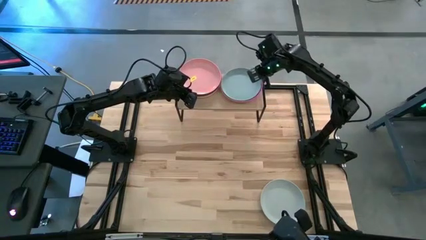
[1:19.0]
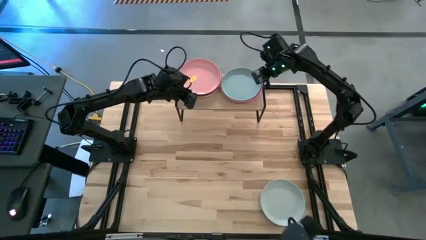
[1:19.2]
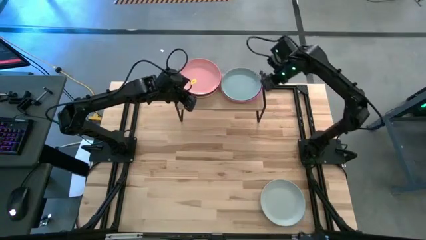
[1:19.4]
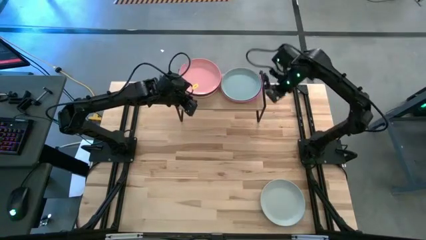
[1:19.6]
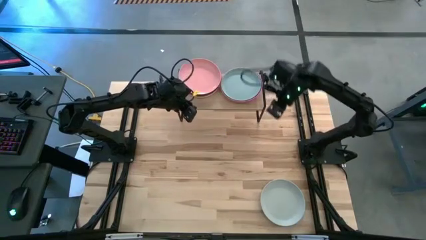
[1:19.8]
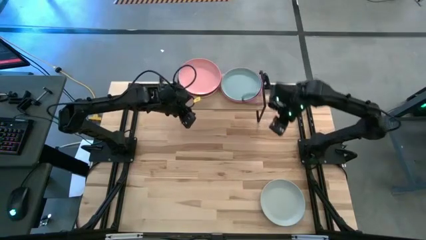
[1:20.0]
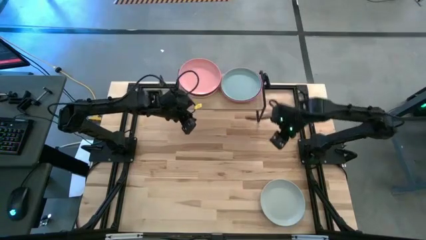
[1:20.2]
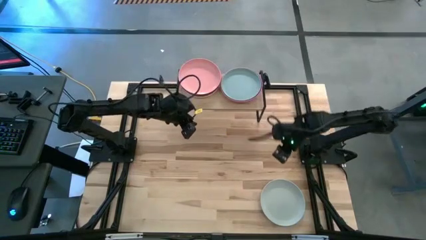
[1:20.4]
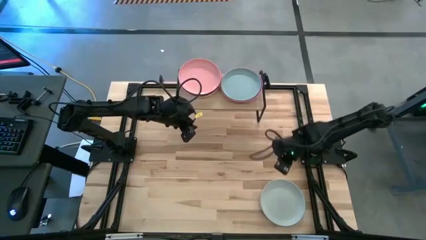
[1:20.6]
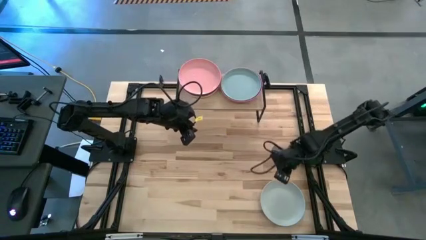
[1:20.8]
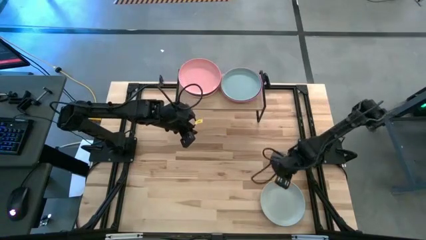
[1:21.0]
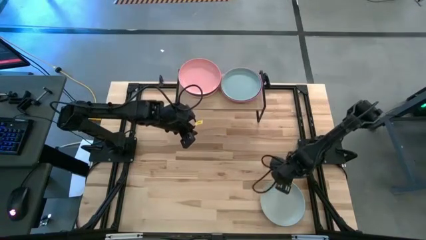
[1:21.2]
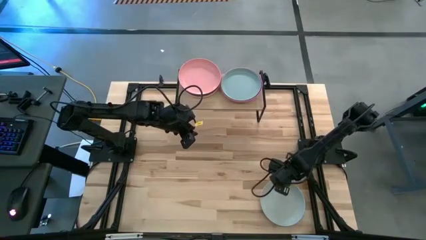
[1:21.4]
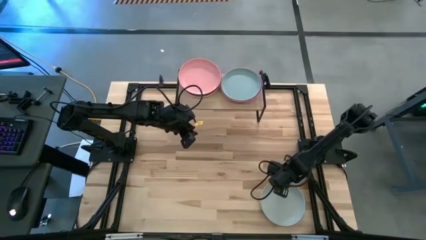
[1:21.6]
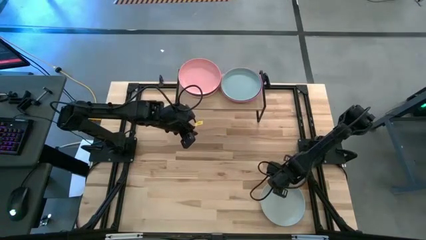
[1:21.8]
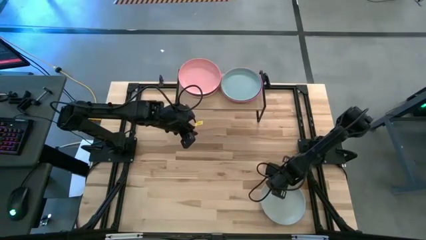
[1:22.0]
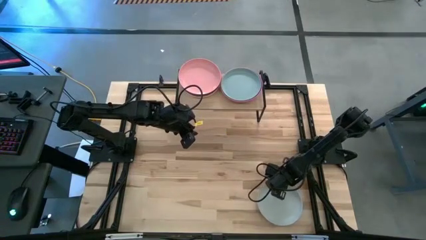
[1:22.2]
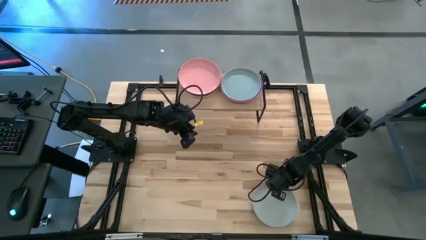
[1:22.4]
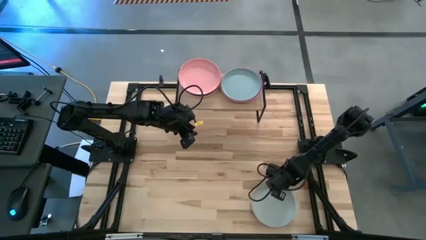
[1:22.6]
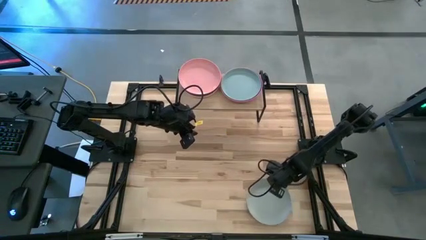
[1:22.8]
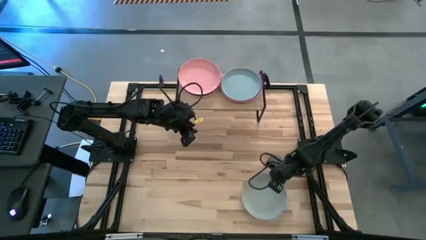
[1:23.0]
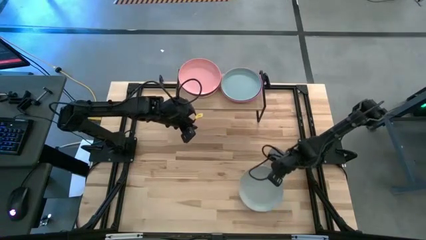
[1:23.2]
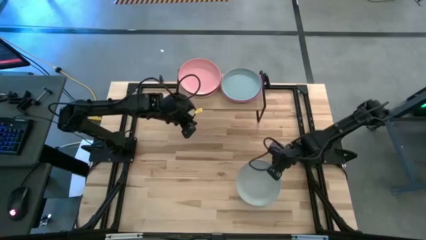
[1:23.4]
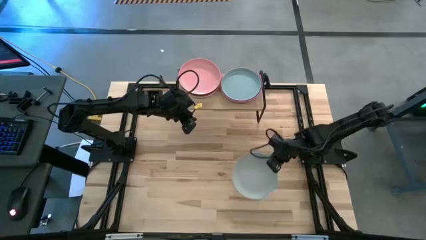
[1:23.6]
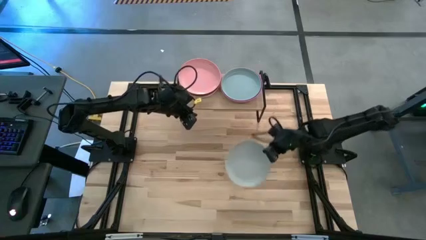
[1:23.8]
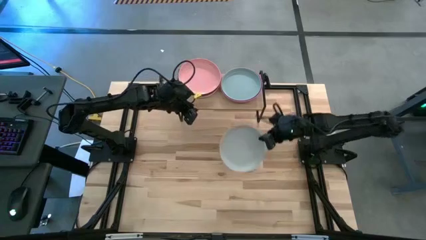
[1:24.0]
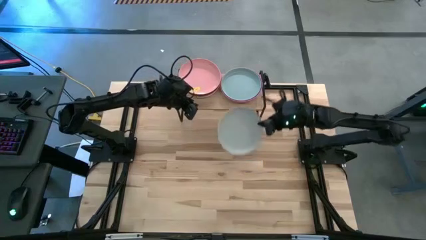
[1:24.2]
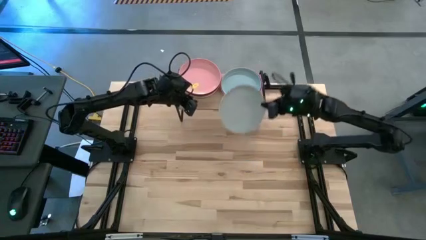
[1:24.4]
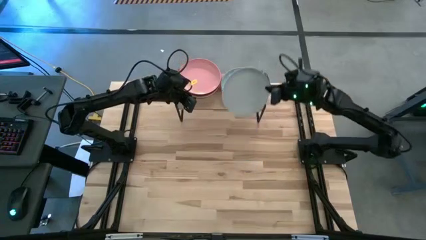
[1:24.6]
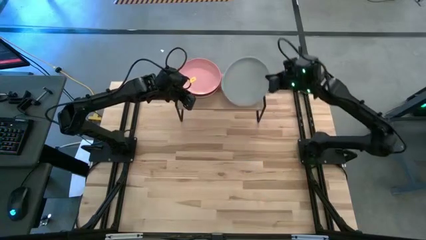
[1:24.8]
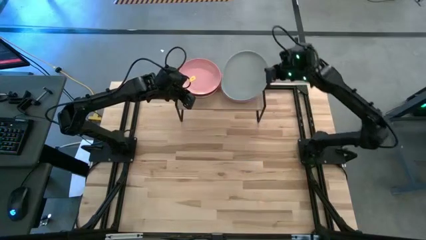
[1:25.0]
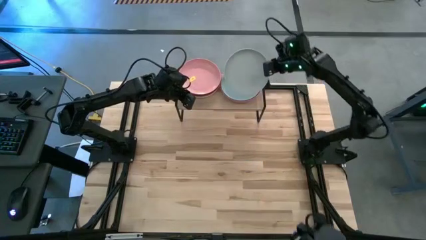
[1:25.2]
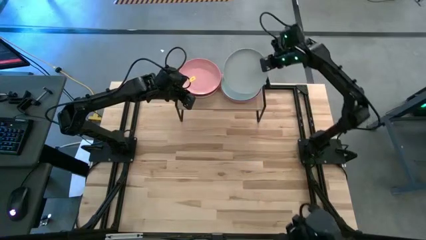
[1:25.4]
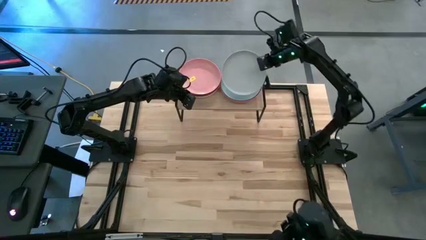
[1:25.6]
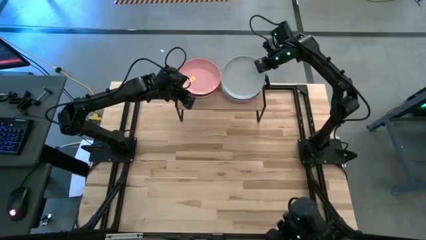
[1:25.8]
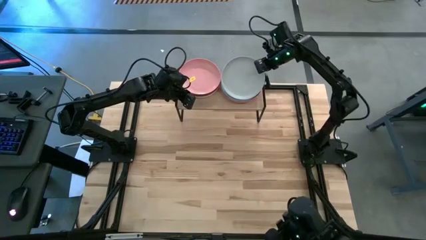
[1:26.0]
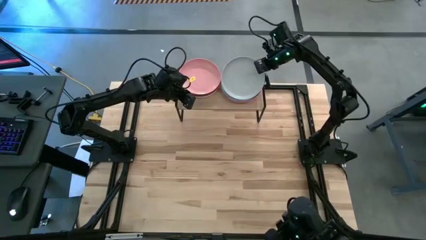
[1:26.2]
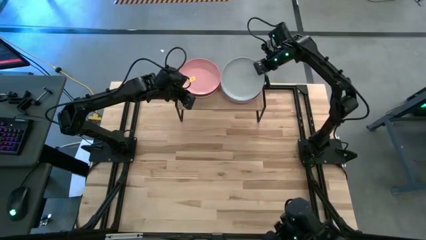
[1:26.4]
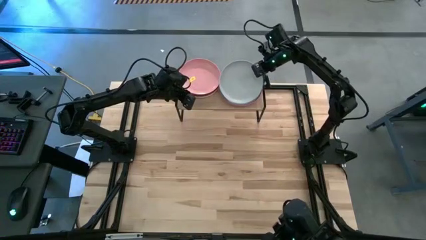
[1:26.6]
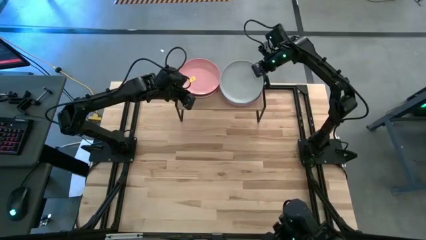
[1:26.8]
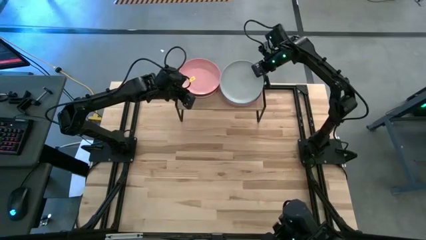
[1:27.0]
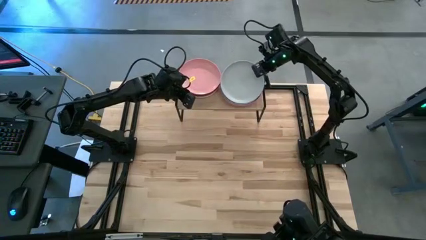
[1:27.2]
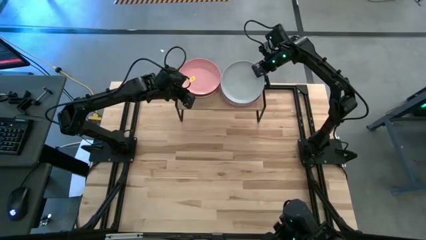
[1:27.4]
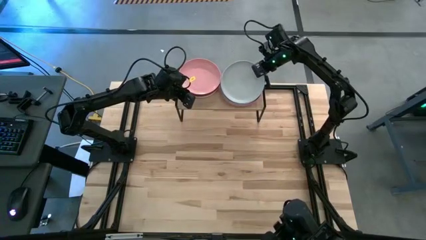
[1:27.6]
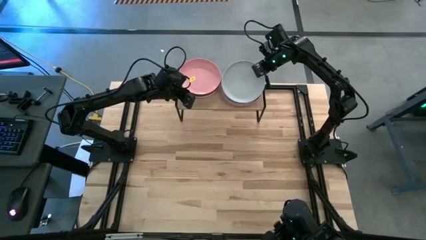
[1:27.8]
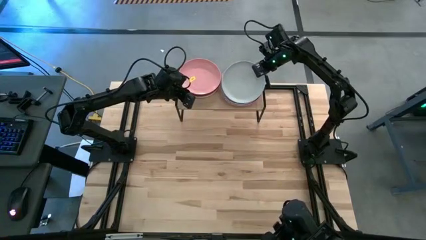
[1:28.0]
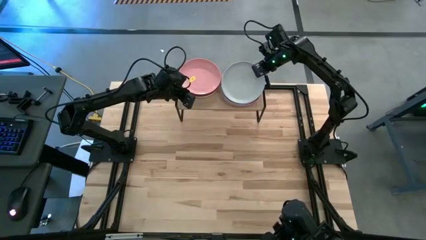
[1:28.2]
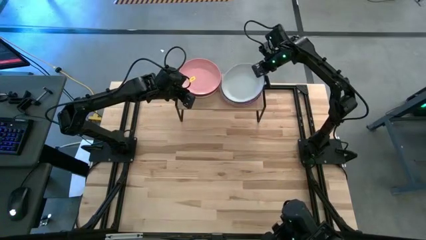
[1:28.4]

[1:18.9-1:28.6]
Task: Place and stack plates onto a shelf
Stack the gray plate on top of the blue plate on the shelf

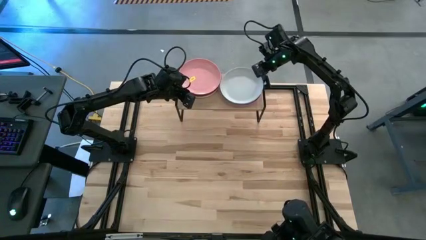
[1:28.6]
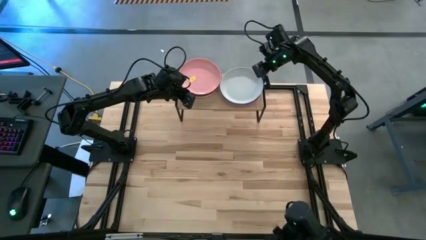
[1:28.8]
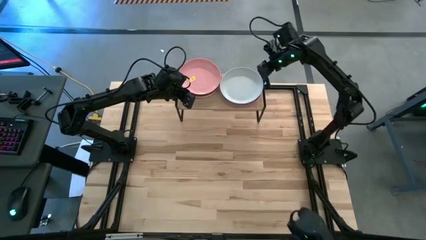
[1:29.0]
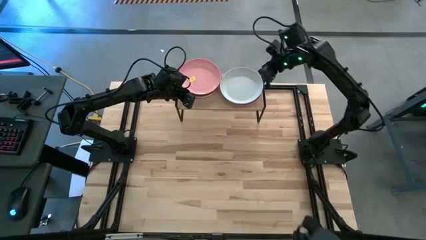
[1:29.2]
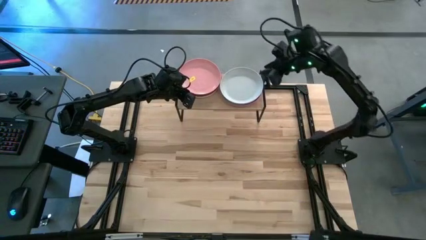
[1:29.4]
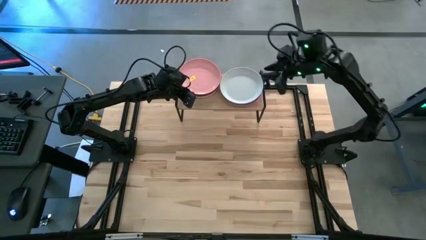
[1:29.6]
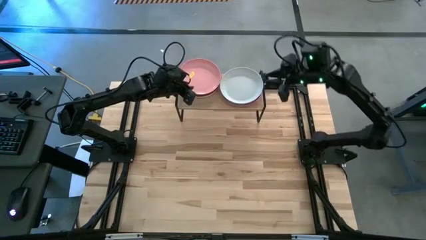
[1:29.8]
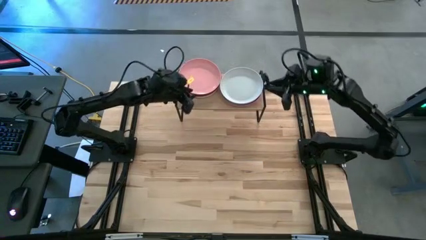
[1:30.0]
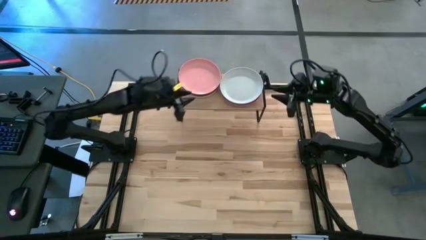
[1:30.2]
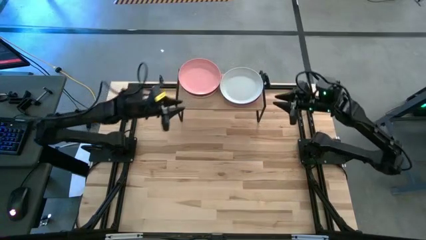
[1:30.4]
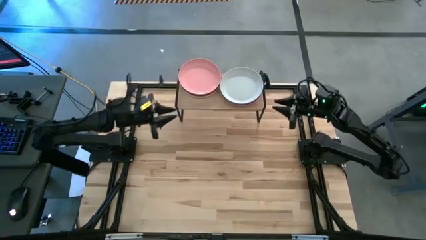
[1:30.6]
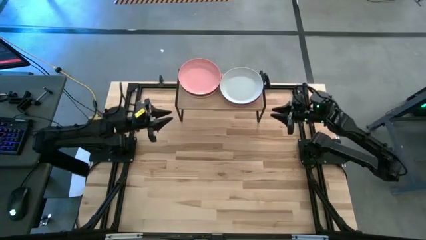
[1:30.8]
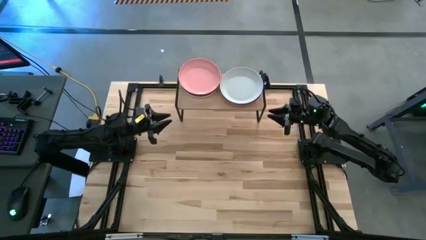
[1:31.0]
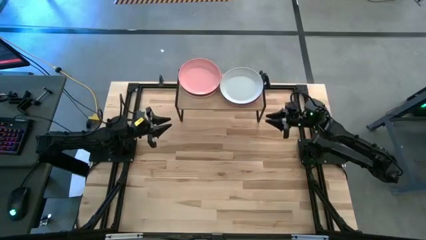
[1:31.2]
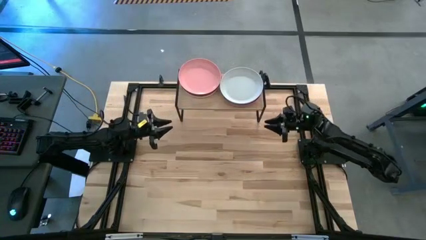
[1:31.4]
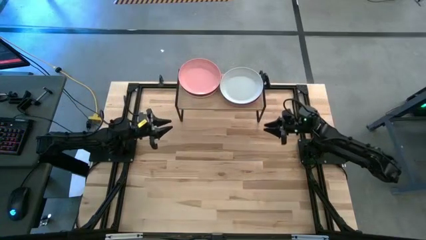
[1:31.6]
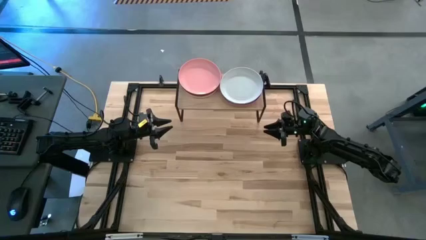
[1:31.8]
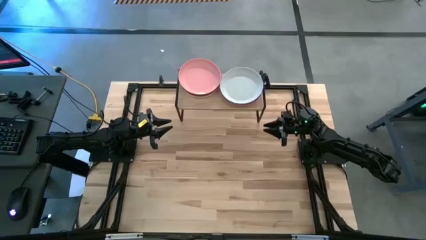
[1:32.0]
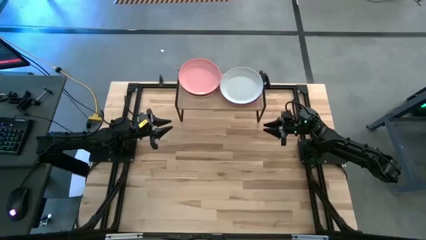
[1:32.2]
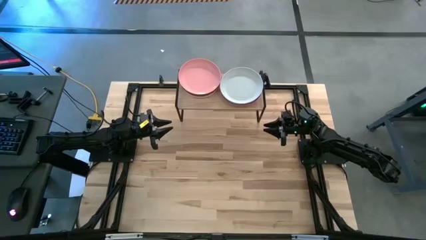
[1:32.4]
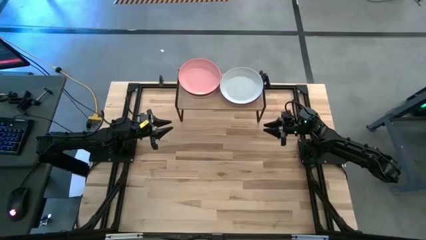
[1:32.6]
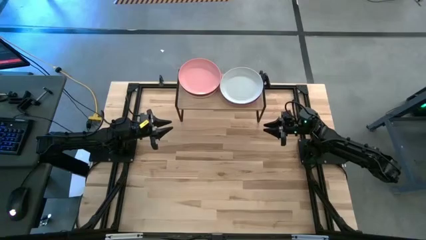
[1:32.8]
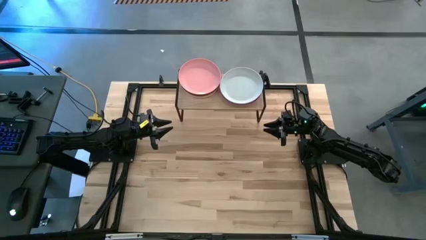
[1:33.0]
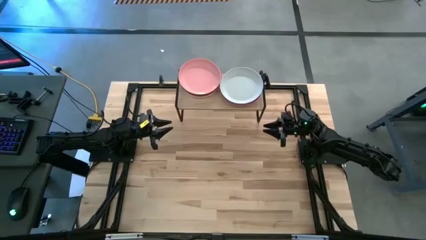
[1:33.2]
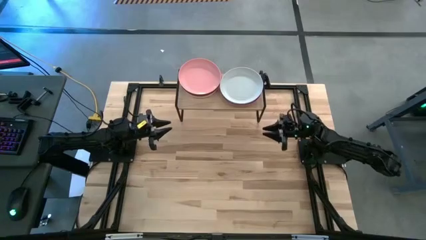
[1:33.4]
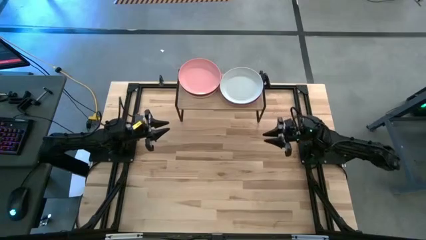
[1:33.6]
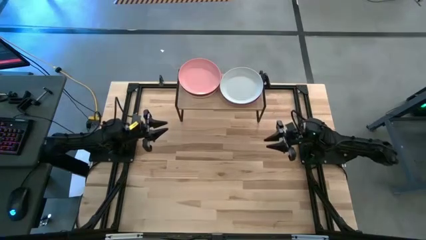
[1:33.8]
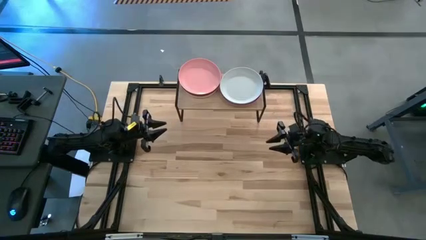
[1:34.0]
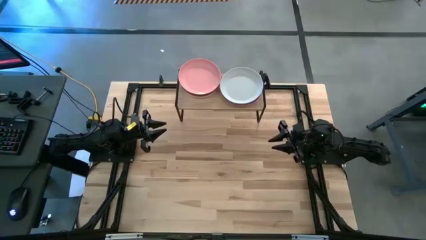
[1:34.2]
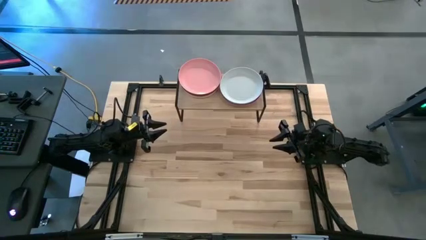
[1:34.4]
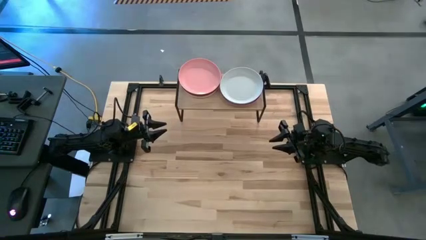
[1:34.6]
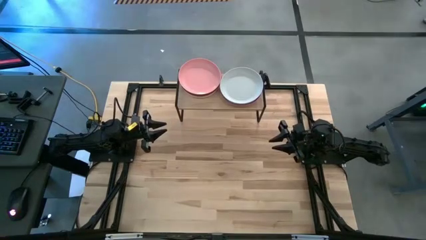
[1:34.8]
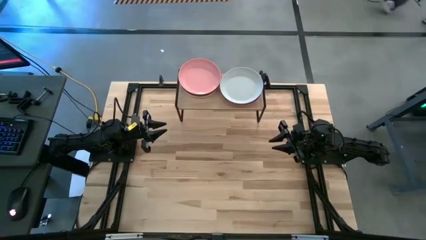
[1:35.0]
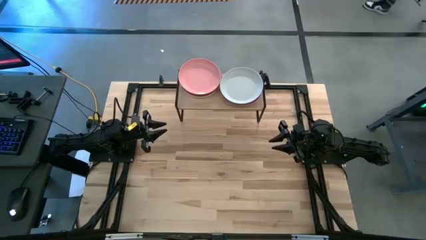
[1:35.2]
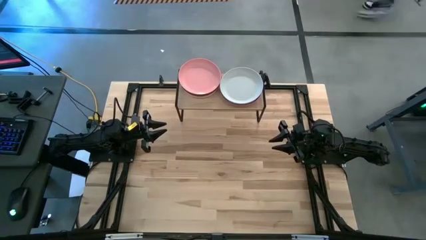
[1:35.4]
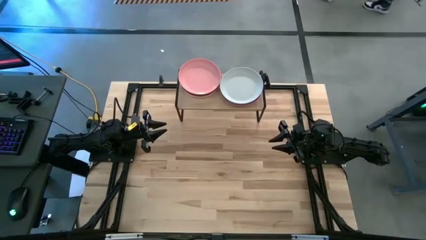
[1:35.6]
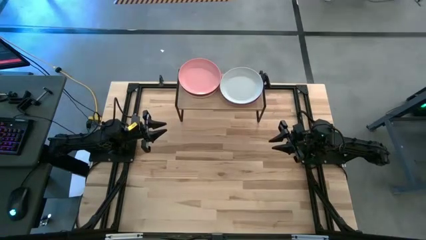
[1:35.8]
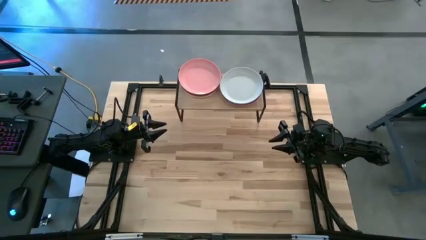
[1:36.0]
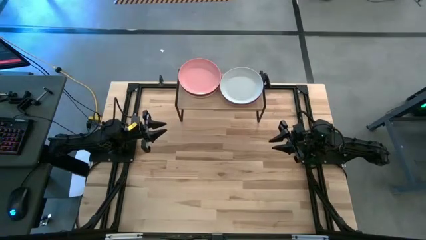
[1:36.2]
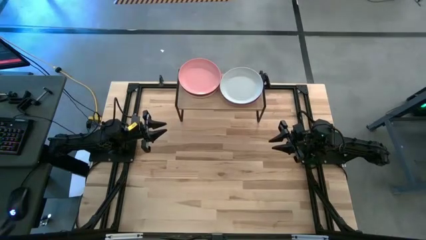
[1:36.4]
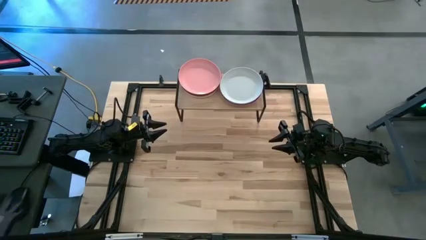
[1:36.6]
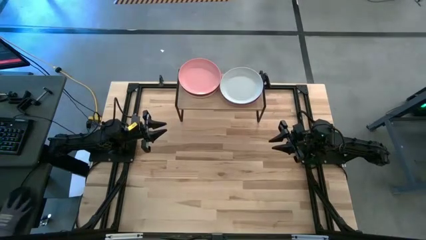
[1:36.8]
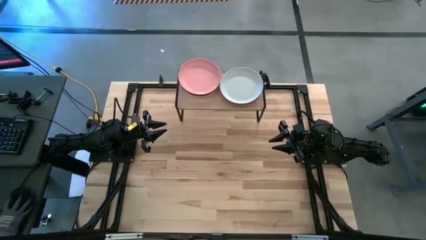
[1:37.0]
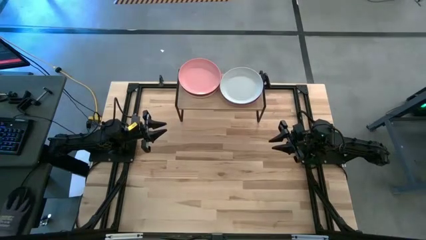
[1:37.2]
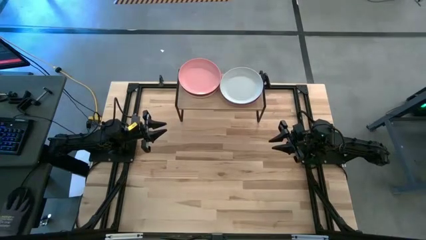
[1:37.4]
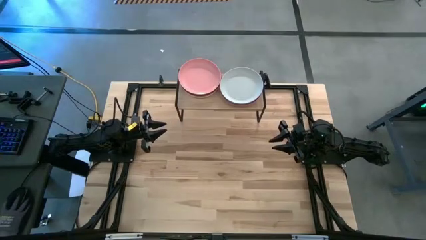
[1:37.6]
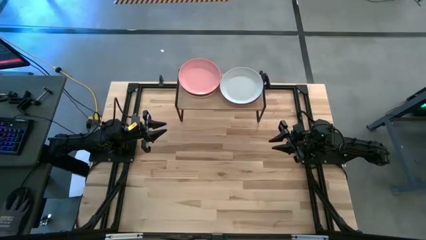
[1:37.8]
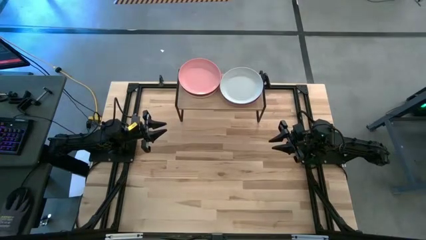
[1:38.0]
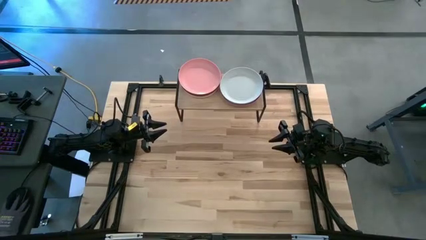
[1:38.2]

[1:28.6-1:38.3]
Return to Home Position
